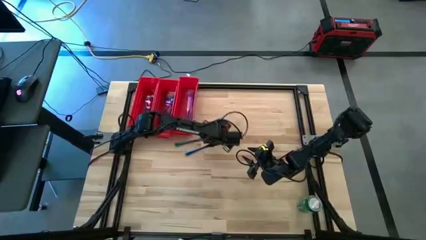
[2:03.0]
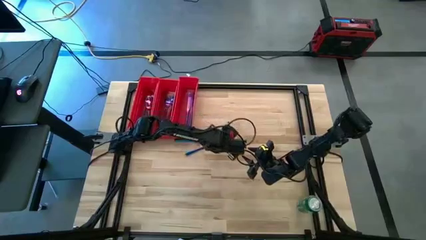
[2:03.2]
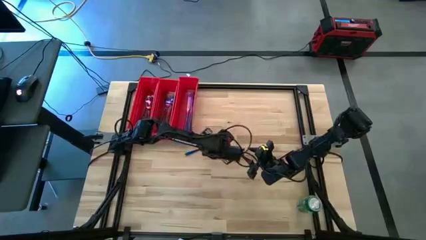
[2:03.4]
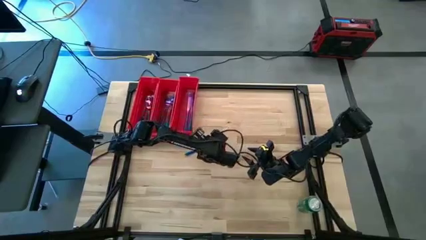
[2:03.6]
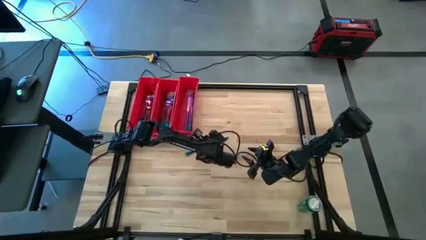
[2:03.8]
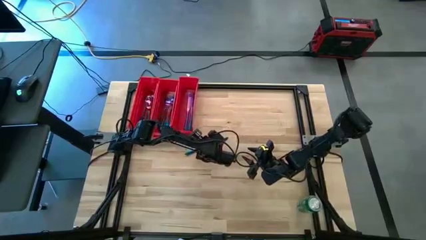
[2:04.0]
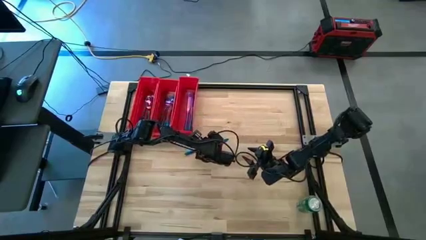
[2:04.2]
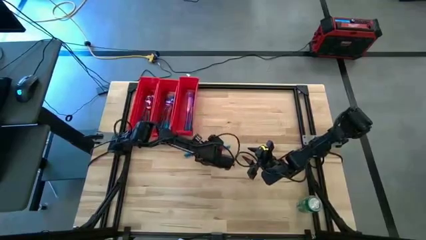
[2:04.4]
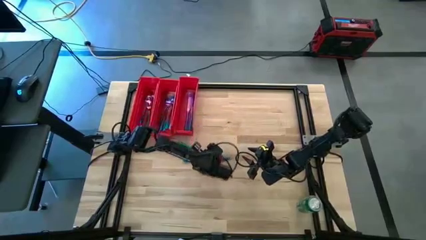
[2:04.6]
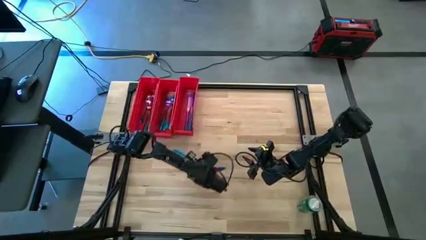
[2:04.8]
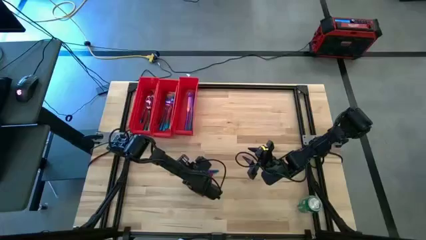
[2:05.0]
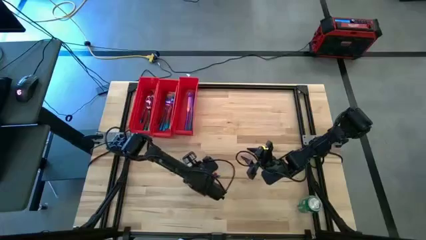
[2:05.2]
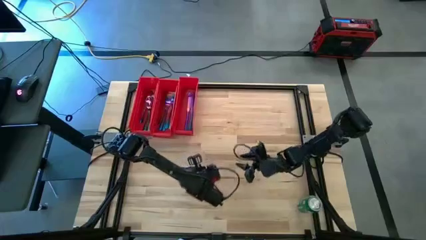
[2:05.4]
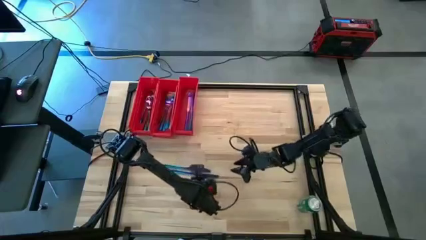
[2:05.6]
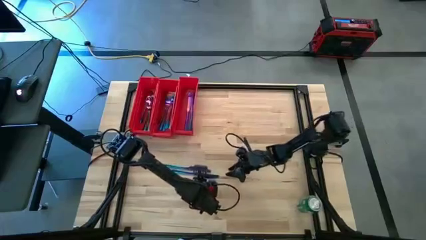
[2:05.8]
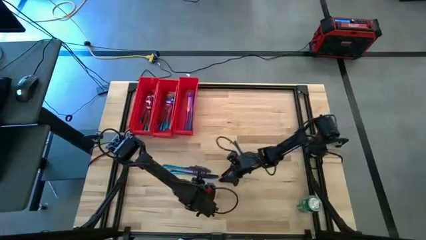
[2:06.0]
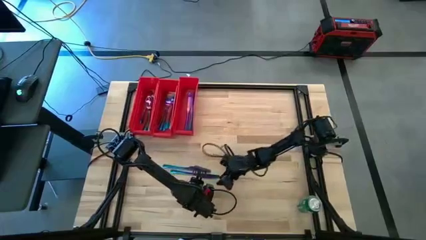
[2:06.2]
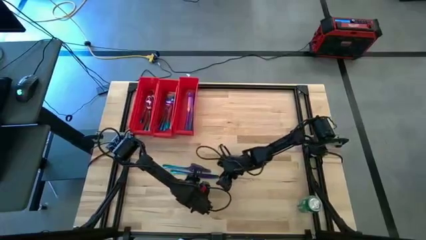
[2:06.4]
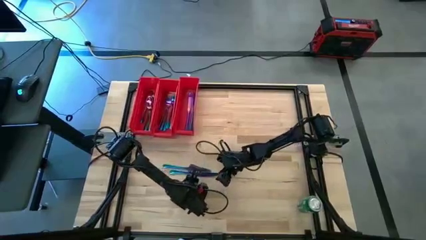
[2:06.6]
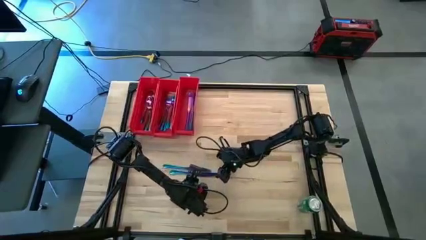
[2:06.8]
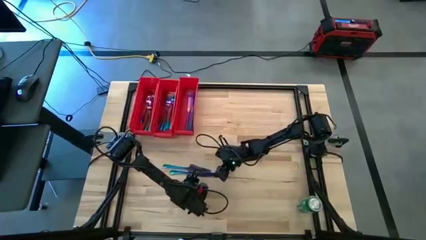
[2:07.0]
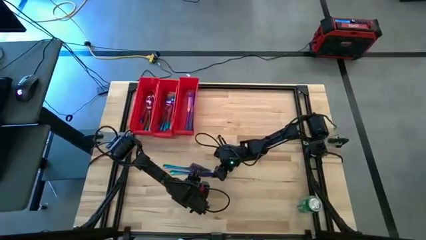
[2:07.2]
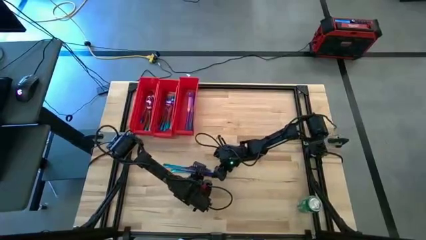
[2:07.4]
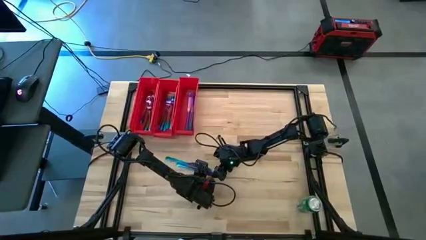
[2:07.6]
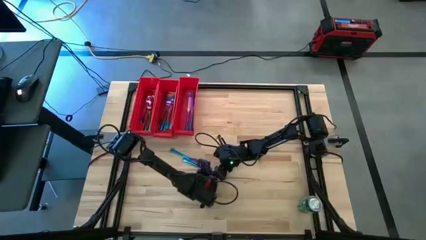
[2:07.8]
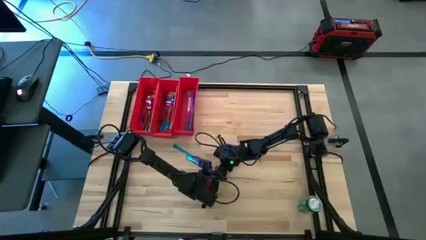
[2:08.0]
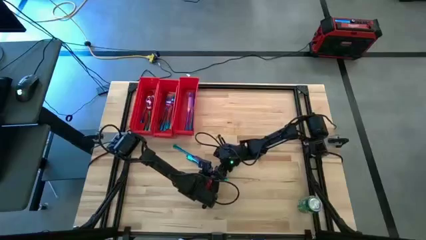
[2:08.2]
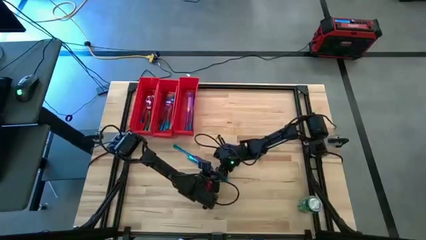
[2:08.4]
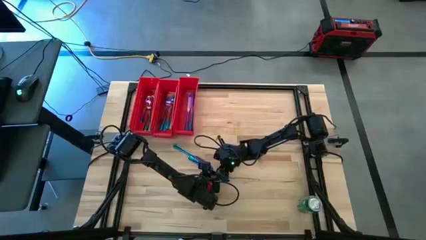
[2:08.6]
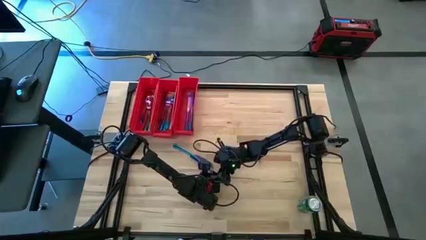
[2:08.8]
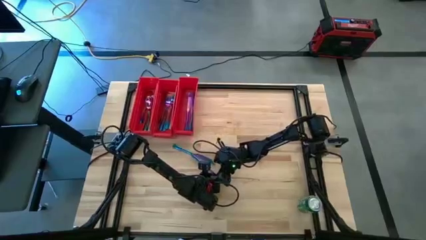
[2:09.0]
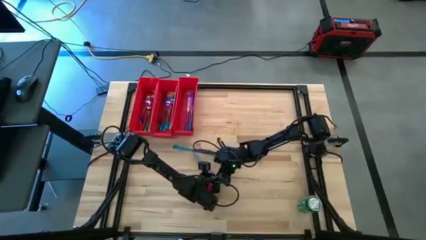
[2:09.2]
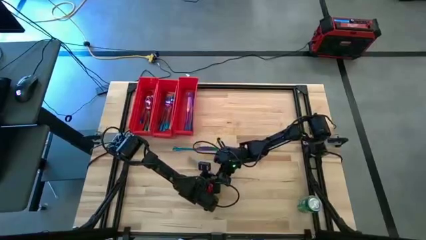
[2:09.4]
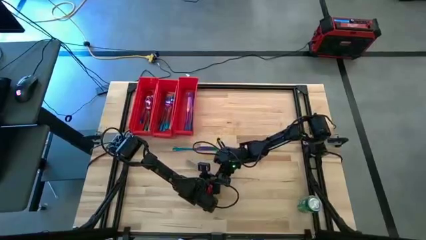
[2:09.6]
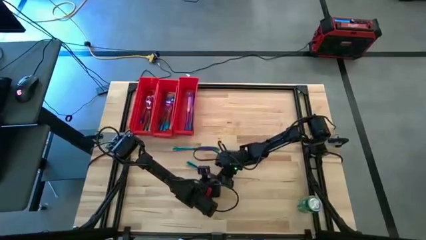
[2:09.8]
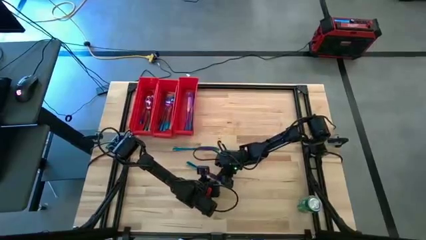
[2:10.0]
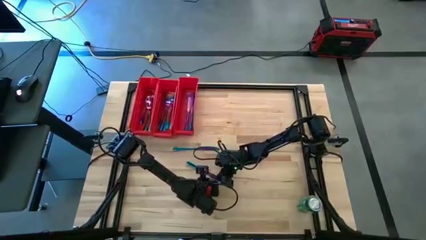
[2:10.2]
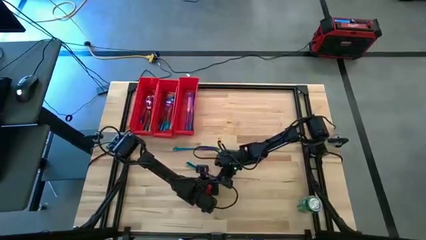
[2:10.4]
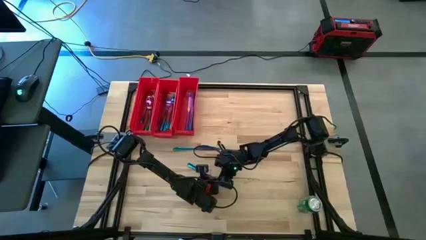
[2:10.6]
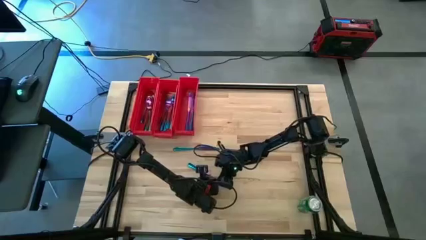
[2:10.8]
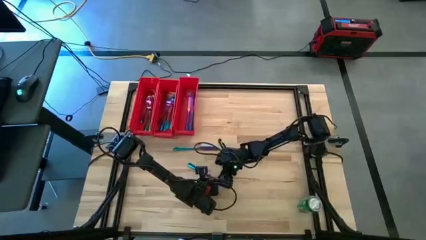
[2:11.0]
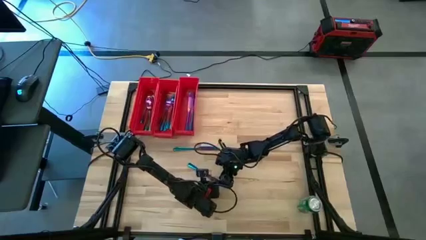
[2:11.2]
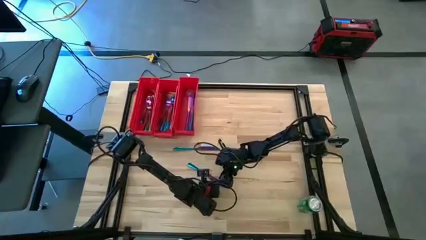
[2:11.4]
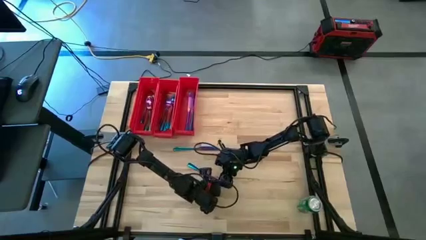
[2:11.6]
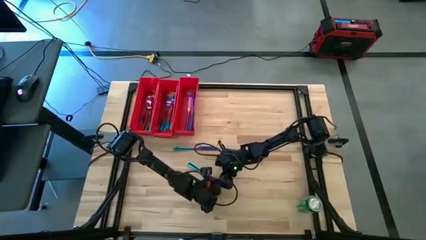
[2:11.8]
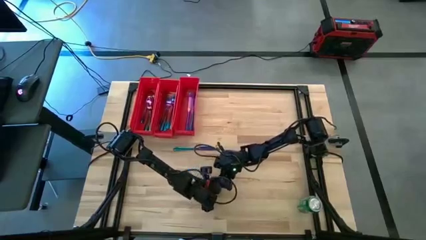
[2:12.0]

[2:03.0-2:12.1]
Task: Sort silverware
Put the blue knife into the right red bin

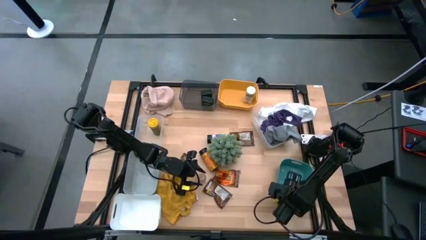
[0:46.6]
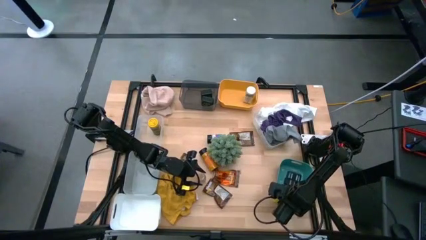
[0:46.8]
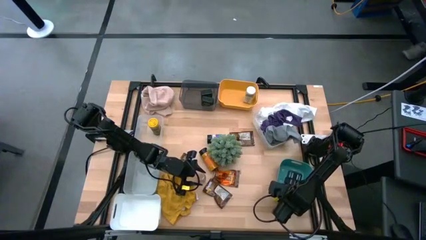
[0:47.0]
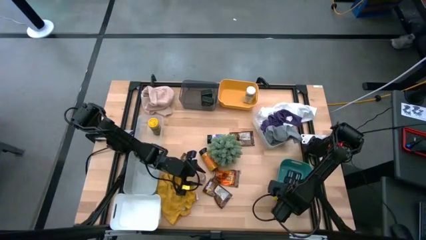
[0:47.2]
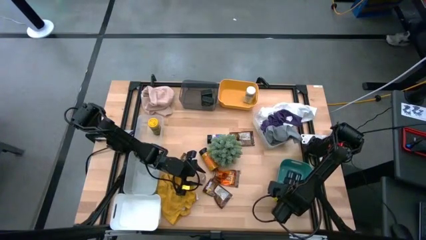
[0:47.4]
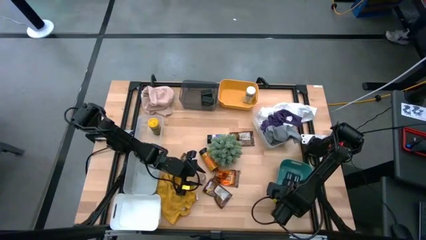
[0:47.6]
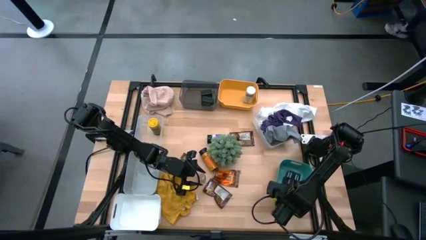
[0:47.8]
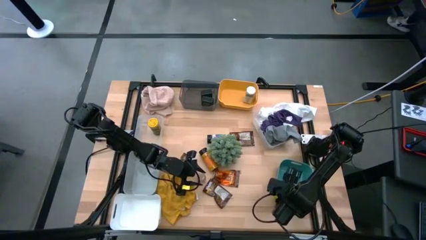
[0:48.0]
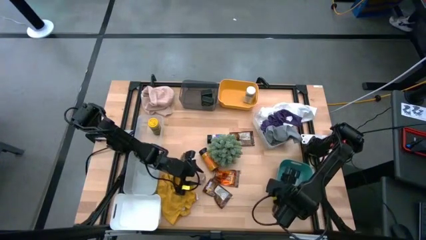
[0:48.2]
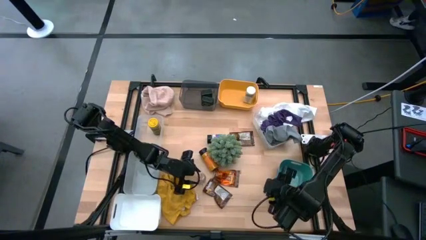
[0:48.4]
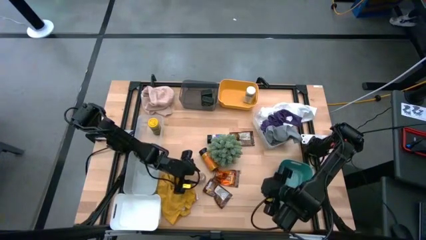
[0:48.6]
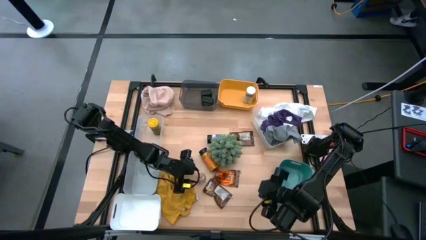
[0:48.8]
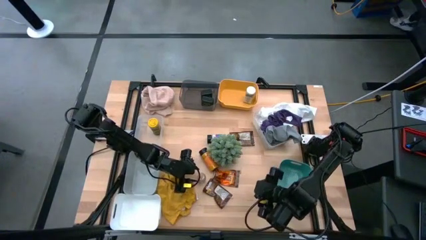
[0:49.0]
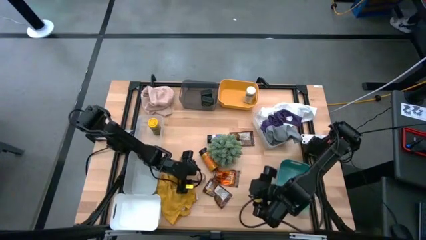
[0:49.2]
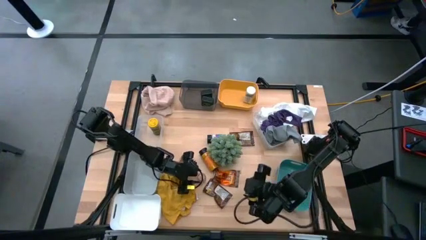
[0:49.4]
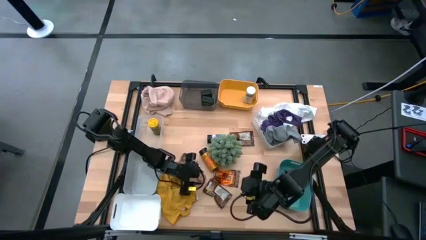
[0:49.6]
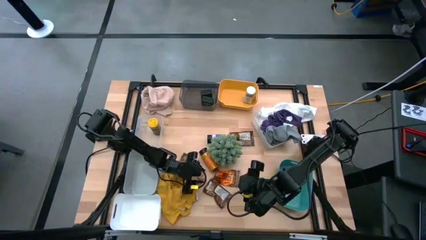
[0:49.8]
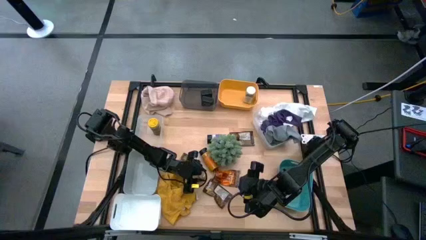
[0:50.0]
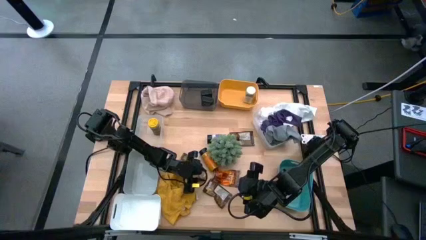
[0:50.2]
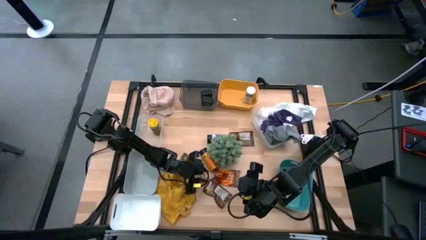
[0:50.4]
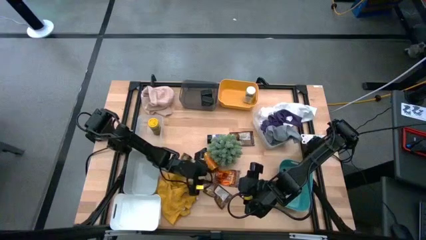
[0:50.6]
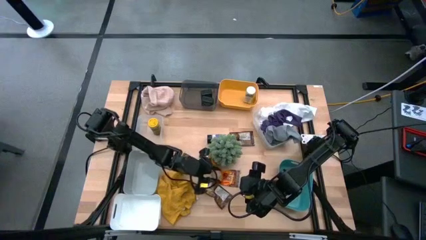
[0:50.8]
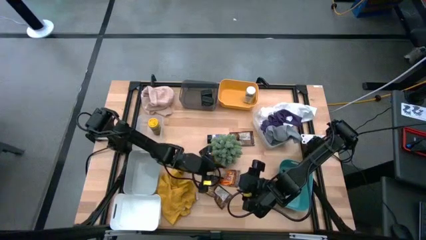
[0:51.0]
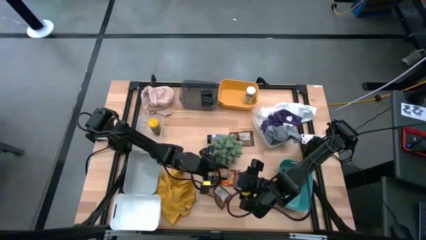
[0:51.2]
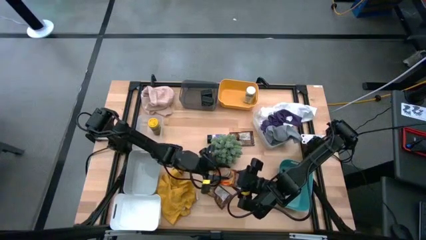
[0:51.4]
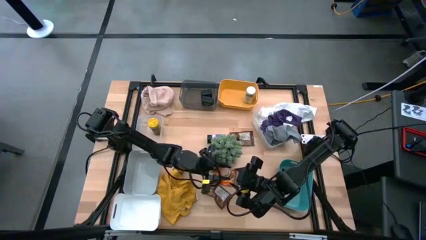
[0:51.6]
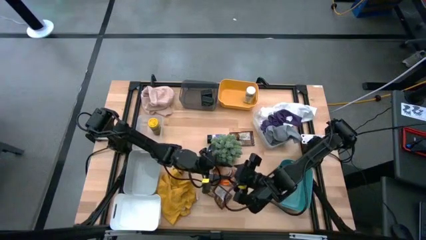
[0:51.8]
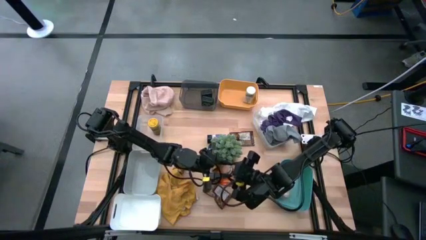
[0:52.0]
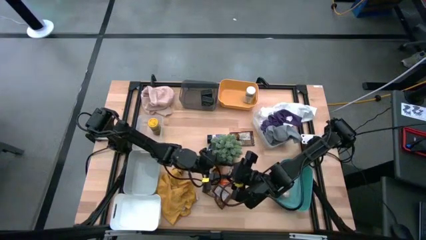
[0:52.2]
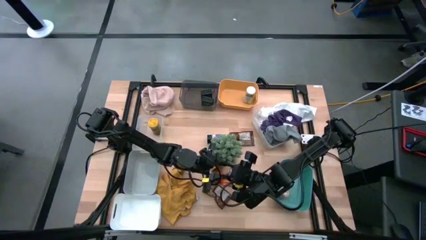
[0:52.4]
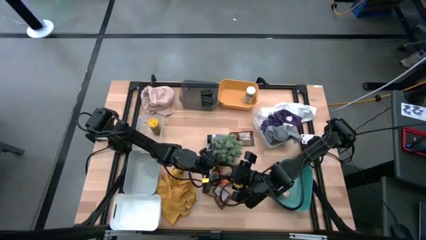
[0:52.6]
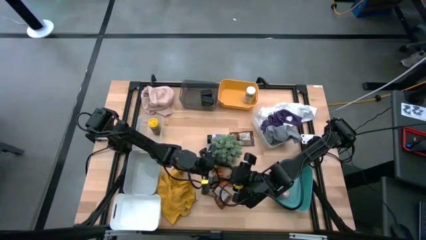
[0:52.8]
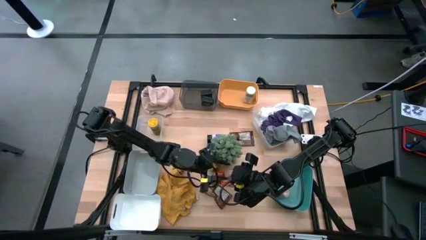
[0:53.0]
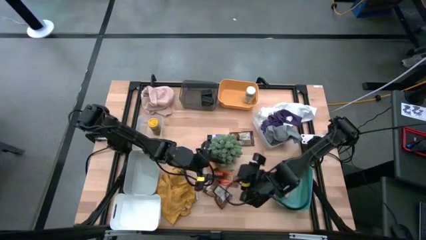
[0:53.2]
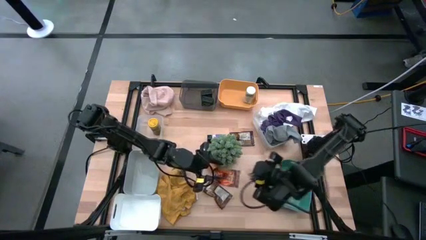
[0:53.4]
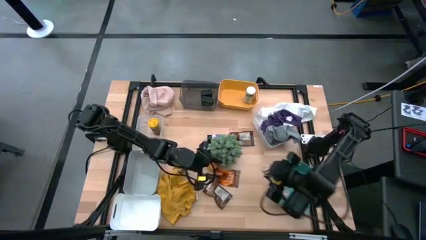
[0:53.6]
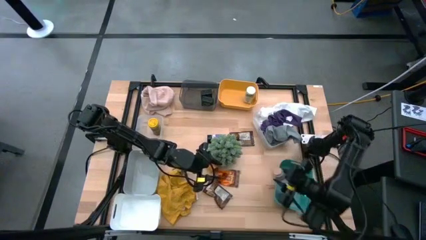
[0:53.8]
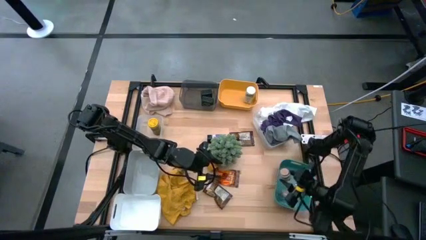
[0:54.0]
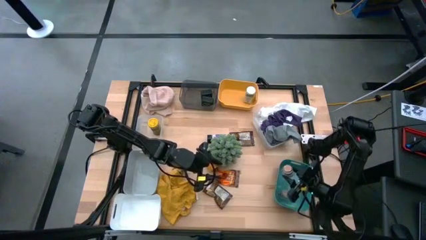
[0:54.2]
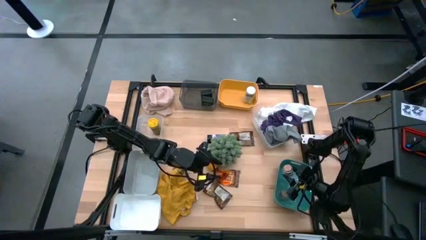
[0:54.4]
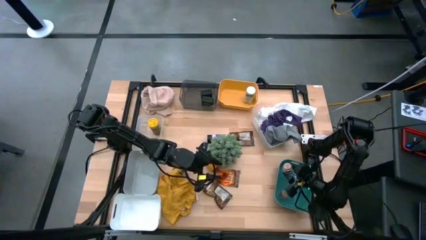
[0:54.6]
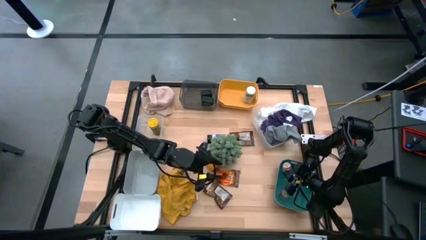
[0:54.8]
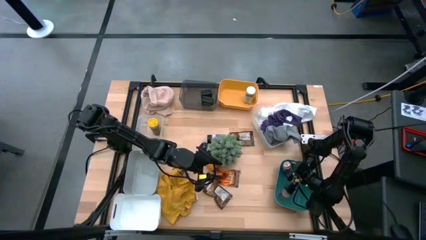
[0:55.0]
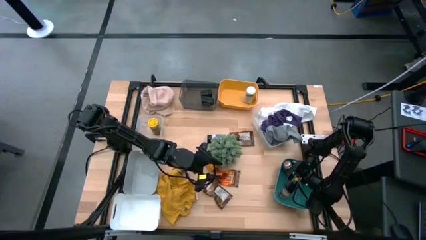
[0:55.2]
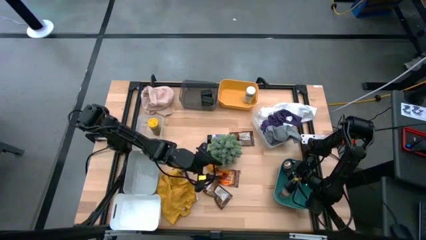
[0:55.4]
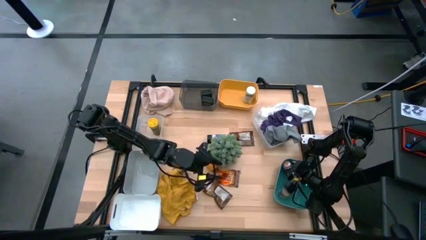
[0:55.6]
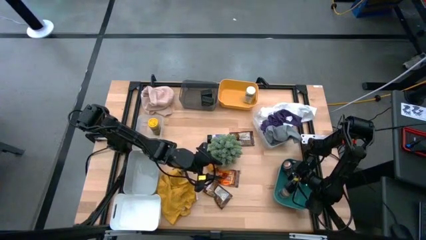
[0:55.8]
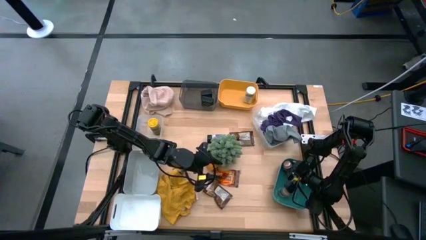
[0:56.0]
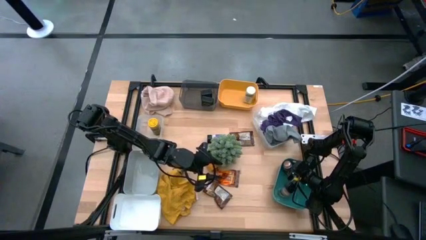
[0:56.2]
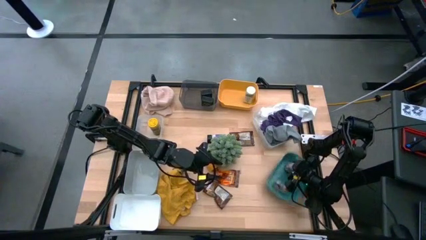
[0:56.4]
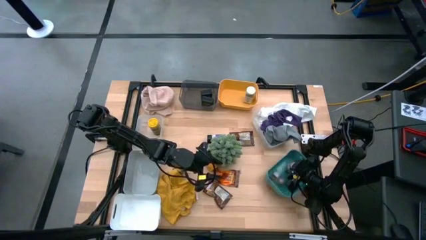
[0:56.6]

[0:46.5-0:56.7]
Task: Sort spices by type
Put the brown spice bottle into the green bin
